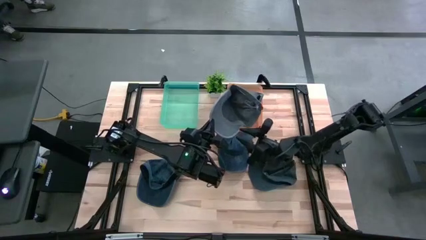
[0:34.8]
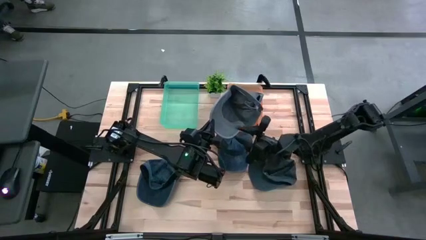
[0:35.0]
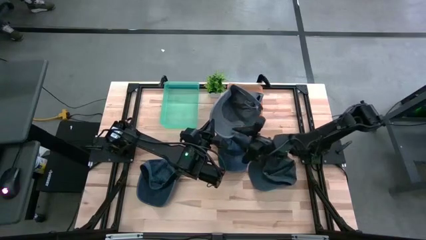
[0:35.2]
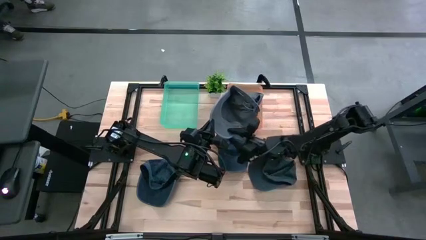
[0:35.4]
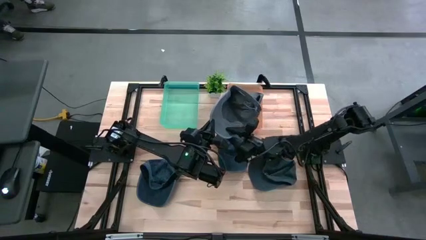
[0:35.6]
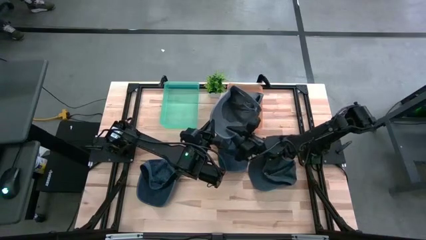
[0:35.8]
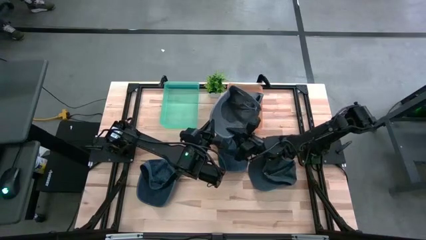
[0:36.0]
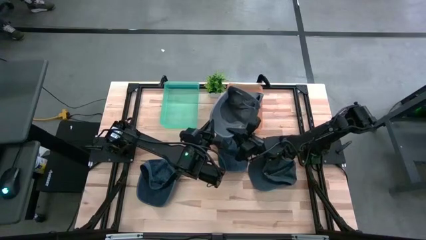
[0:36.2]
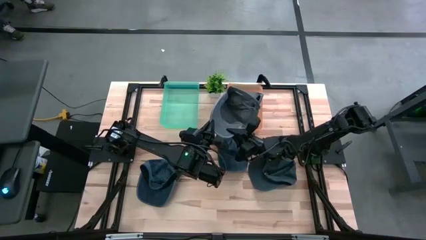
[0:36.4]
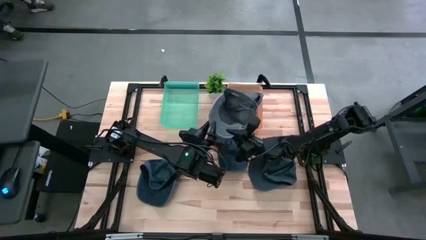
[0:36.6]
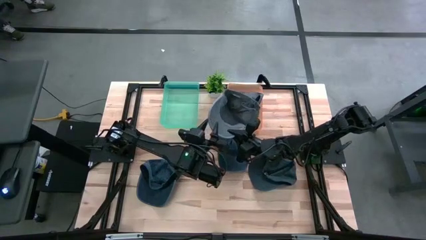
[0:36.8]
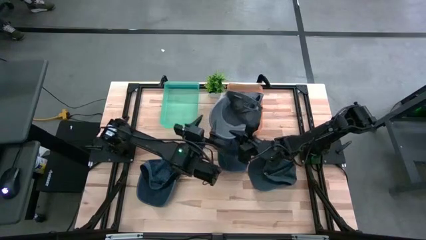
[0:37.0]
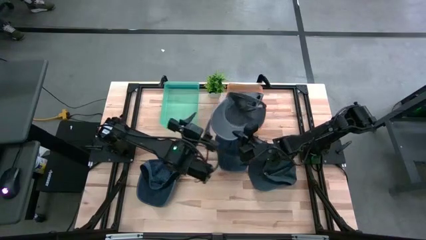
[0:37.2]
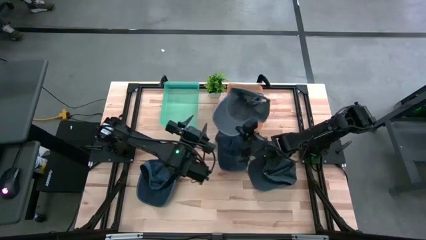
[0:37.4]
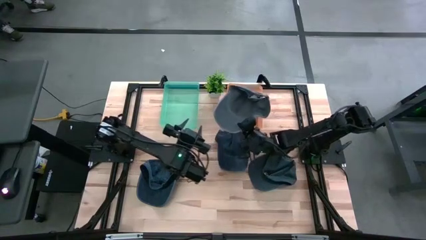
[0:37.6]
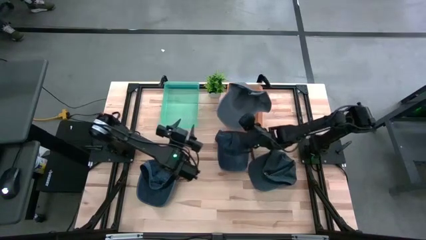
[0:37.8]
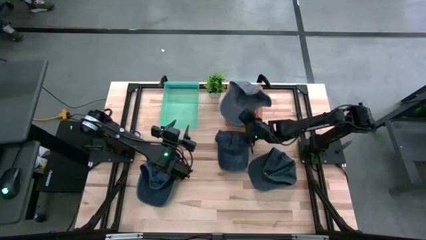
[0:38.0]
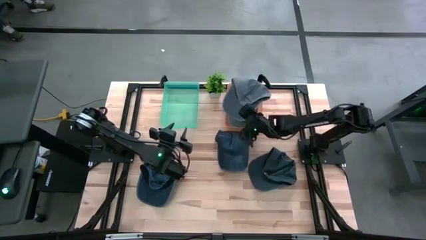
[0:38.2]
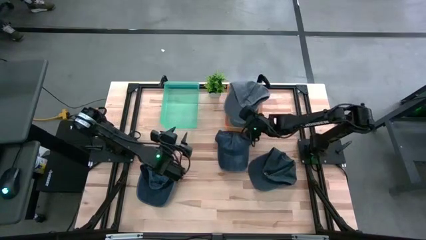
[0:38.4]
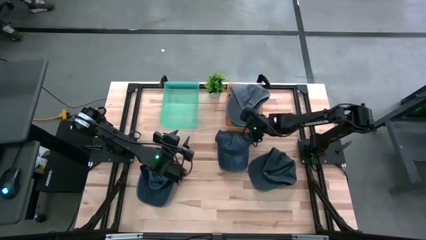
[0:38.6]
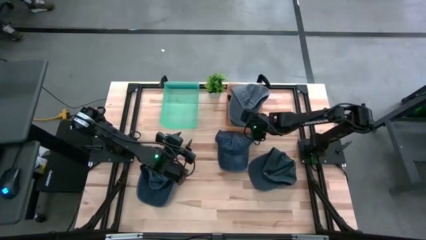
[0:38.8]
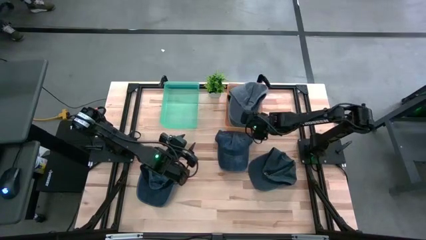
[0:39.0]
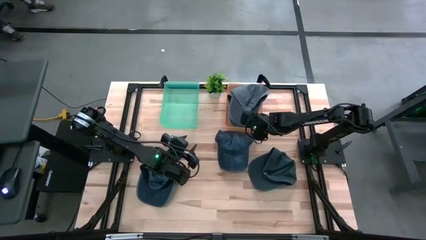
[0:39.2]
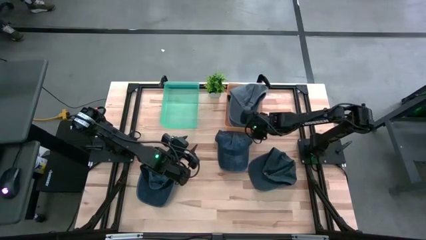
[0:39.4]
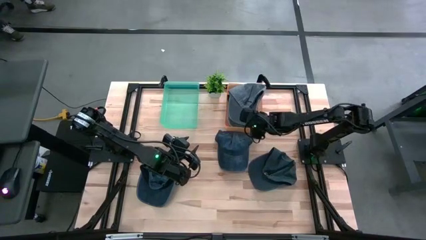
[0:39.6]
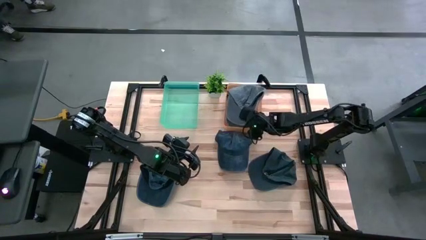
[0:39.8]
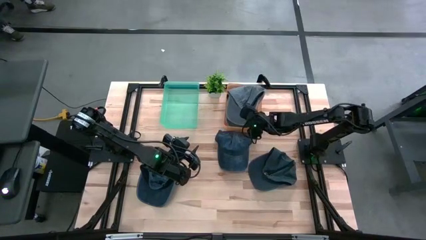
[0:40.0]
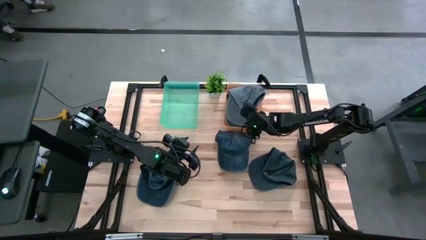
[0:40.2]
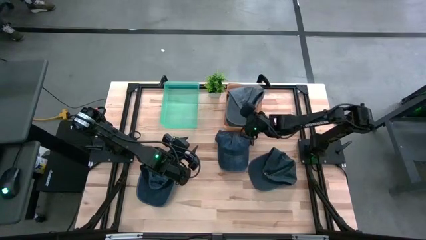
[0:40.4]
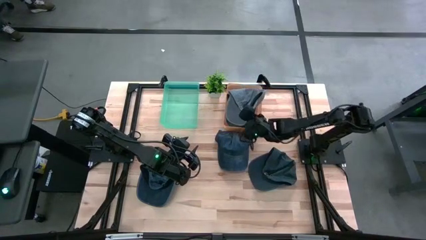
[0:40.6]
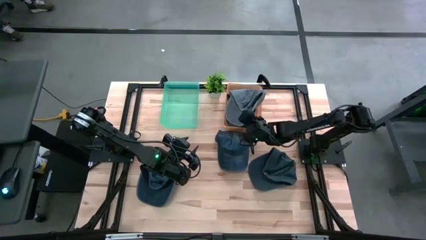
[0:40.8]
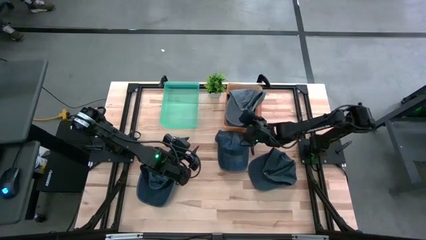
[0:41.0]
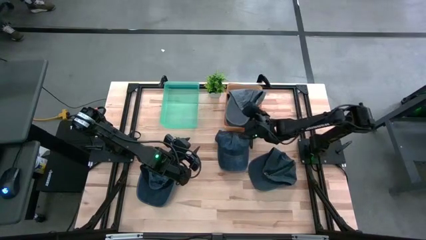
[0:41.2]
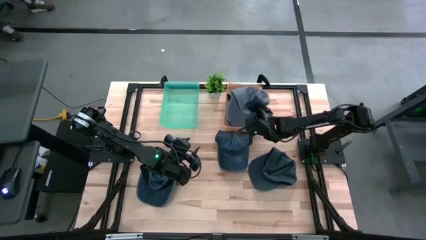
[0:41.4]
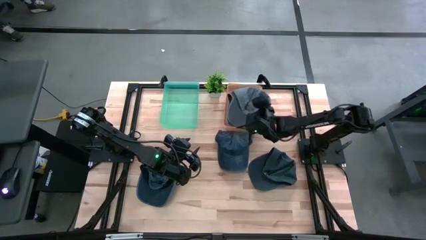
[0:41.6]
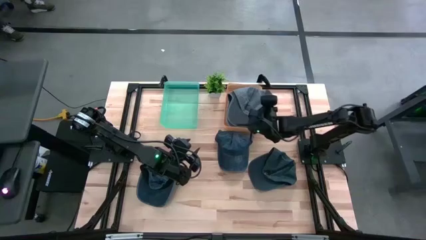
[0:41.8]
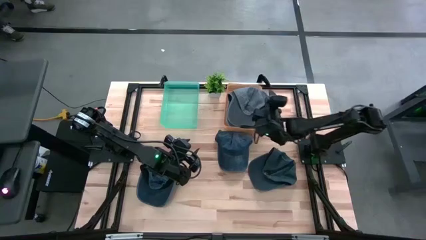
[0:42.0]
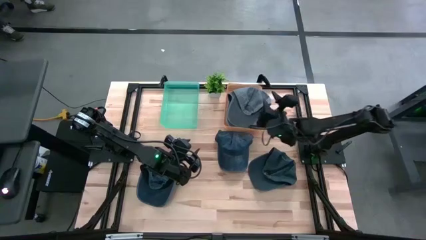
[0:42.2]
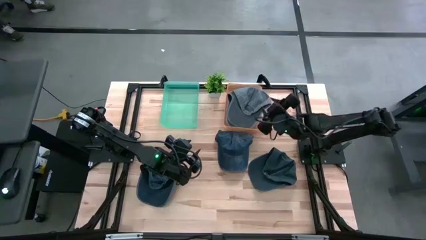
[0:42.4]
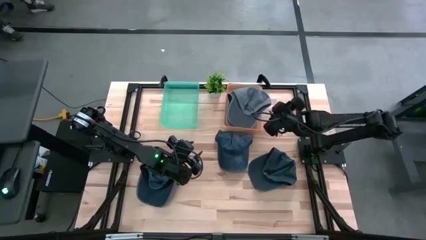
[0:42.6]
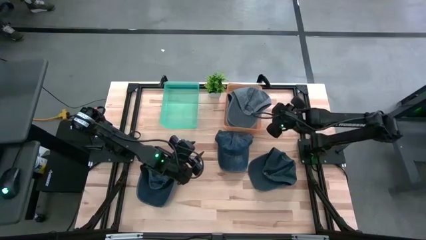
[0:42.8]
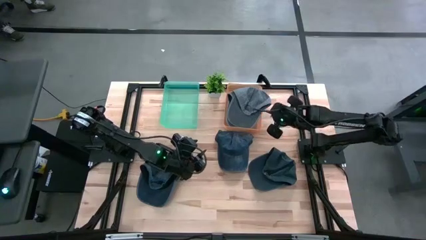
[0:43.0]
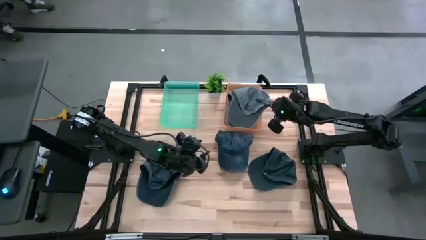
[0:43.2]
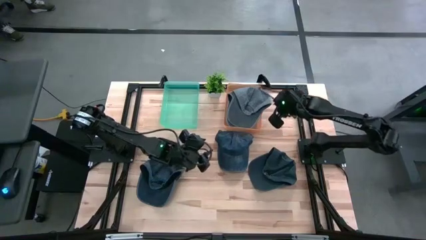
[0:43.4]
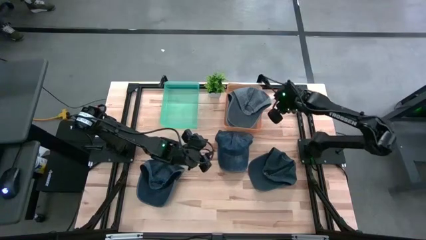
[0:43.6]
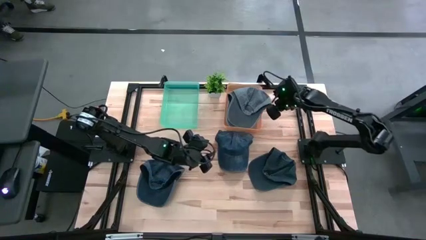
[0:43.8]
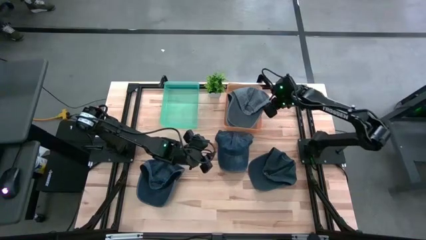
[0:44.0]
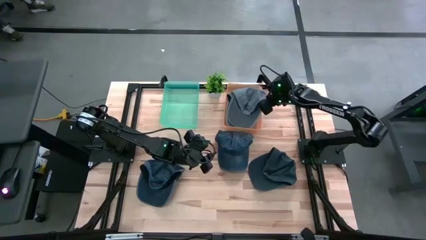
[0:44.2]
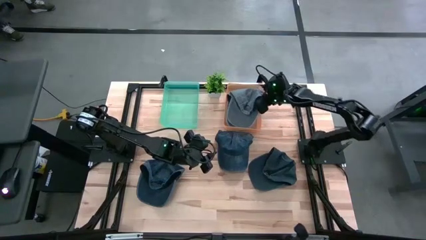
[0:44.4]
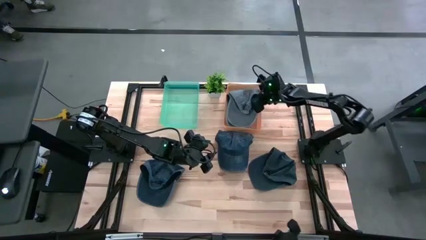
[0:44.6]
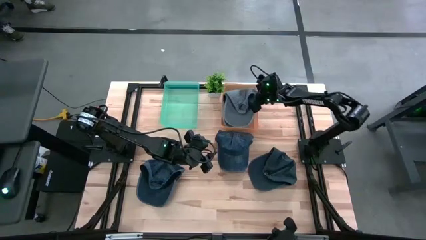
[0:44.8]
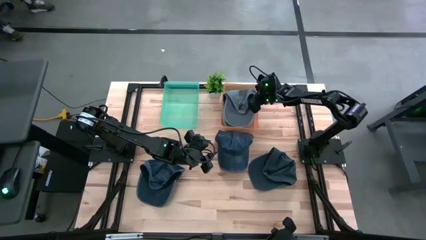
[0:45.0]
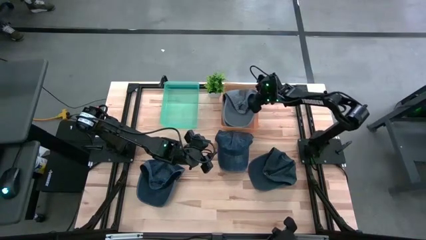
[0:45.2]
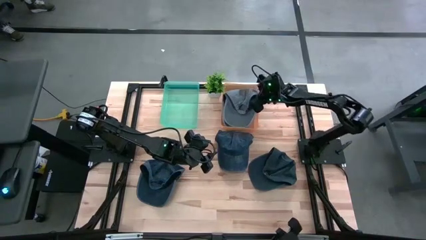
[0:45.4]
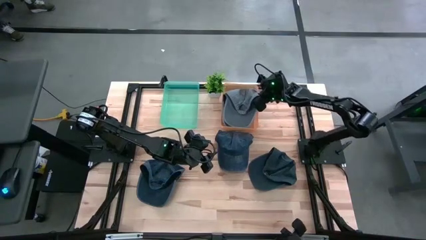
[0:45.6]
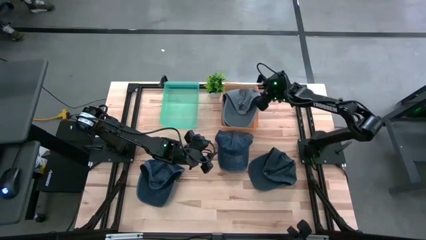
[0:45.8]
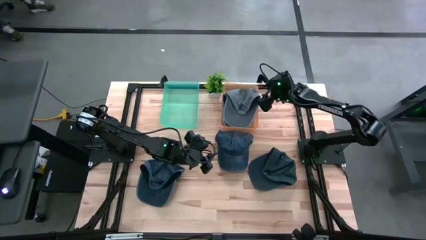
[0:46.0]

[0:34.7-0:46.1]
Task: Pick & Place hat
Put the light gray cap into the orange bin

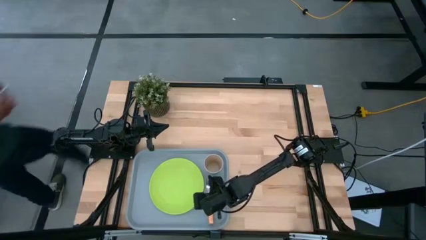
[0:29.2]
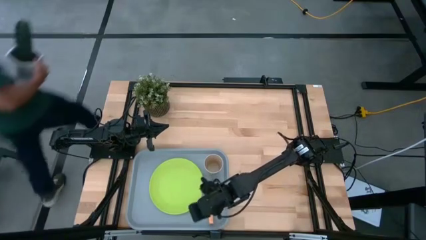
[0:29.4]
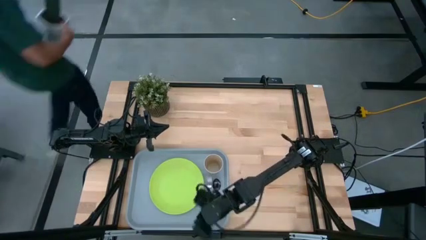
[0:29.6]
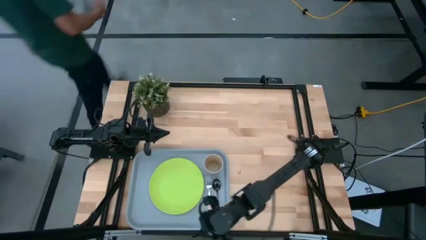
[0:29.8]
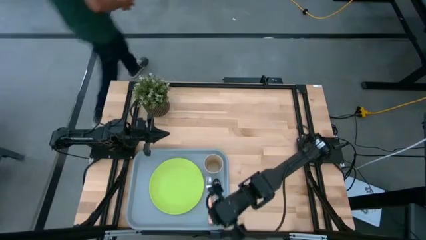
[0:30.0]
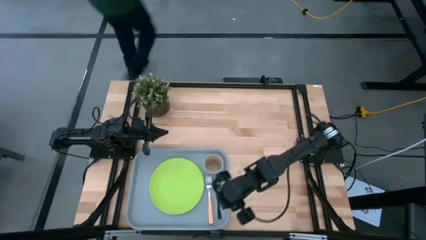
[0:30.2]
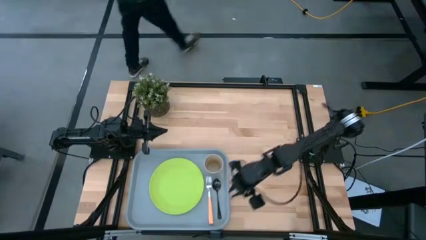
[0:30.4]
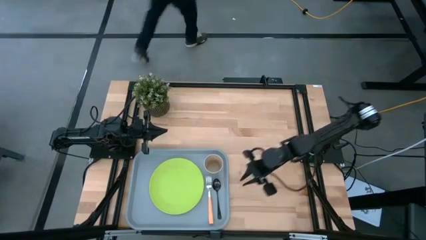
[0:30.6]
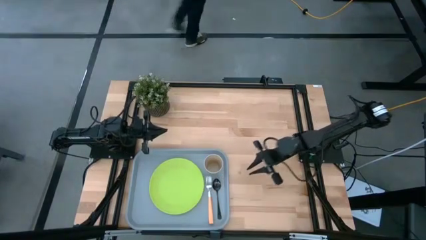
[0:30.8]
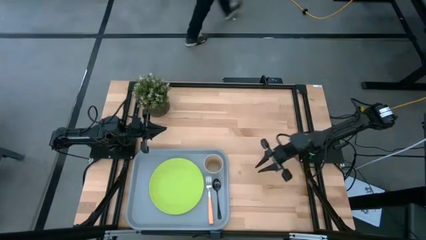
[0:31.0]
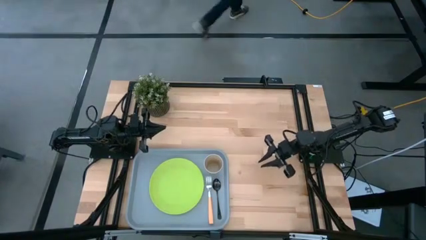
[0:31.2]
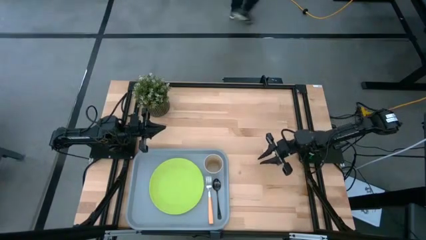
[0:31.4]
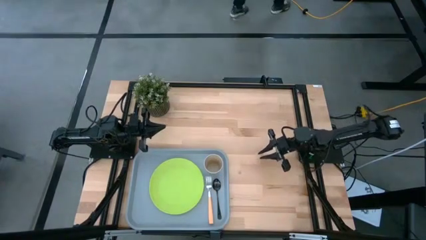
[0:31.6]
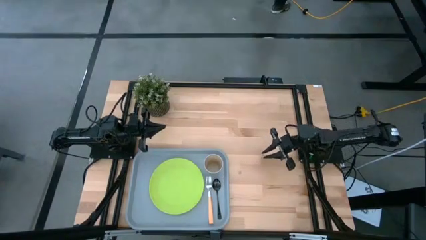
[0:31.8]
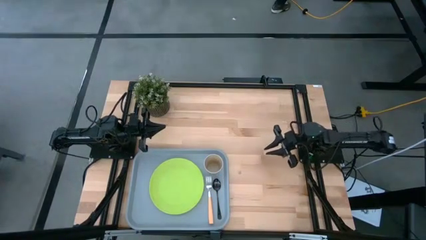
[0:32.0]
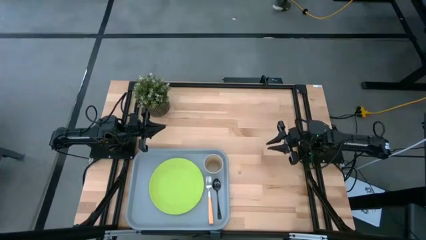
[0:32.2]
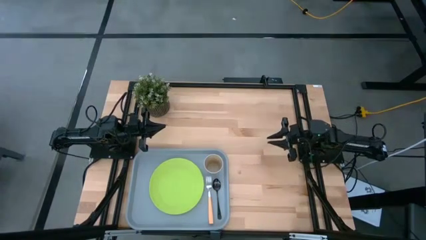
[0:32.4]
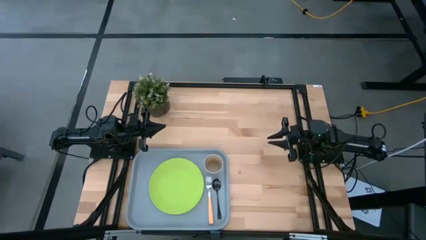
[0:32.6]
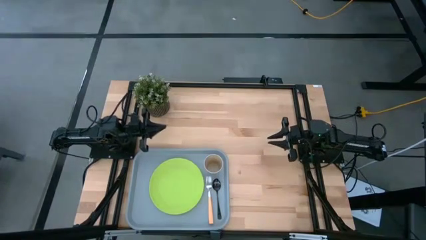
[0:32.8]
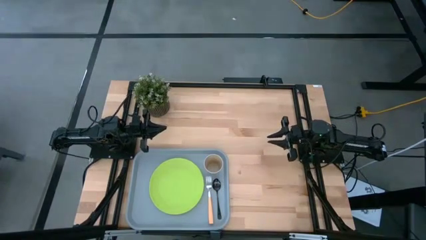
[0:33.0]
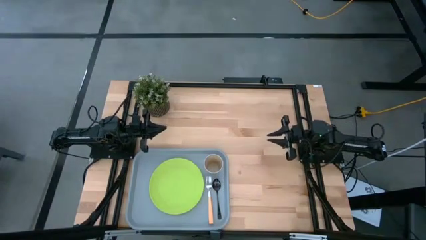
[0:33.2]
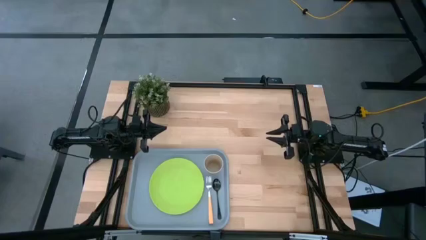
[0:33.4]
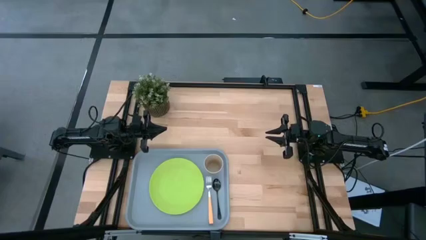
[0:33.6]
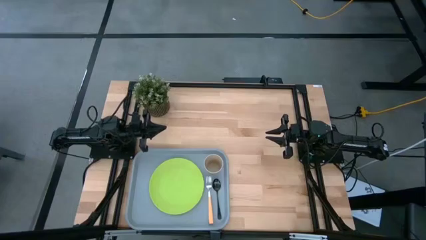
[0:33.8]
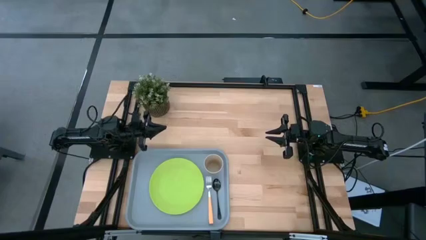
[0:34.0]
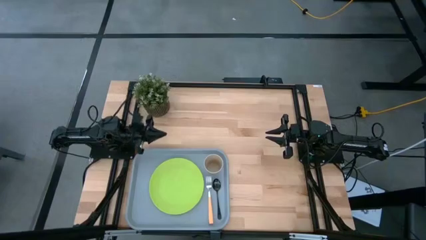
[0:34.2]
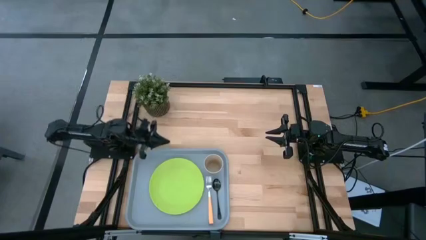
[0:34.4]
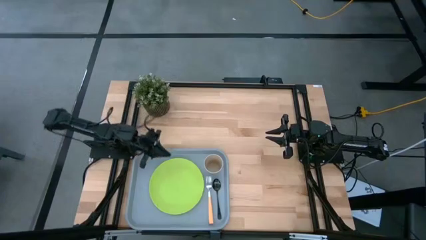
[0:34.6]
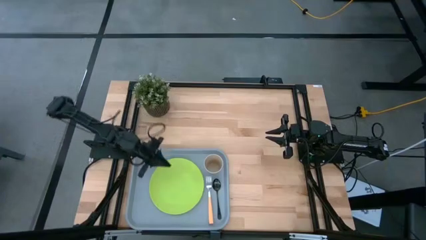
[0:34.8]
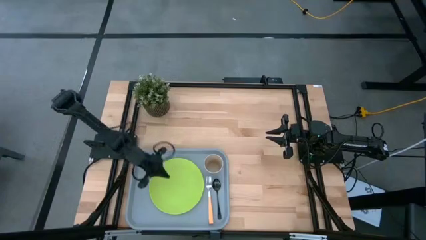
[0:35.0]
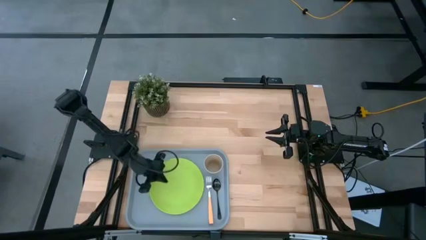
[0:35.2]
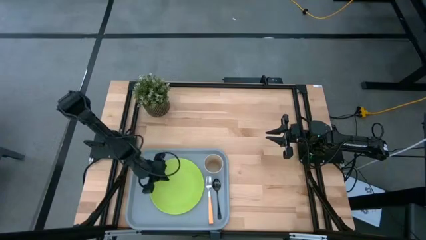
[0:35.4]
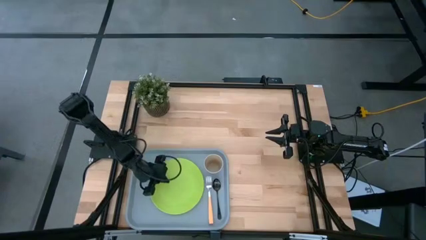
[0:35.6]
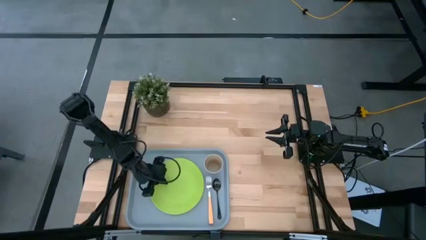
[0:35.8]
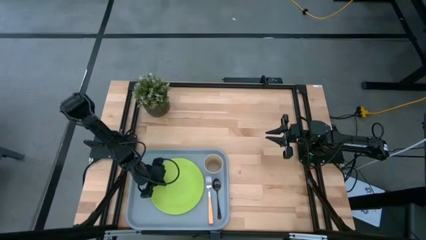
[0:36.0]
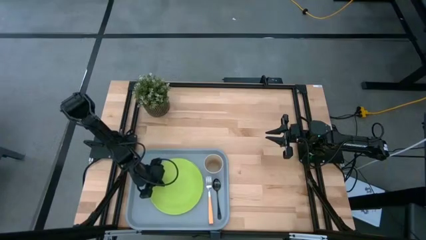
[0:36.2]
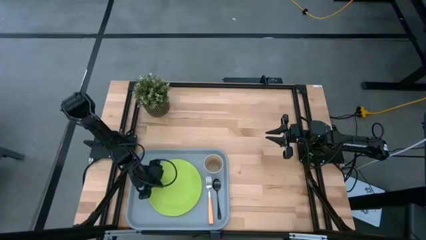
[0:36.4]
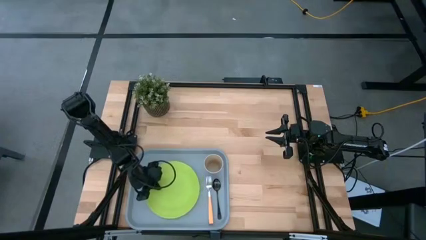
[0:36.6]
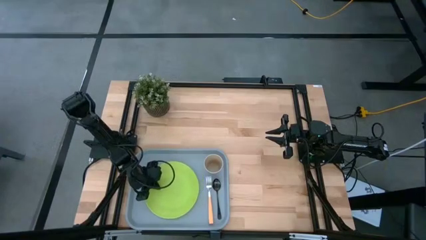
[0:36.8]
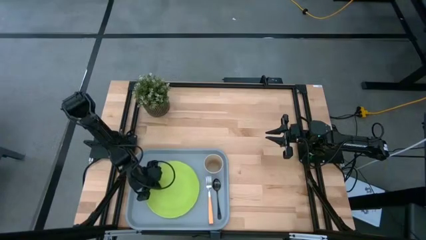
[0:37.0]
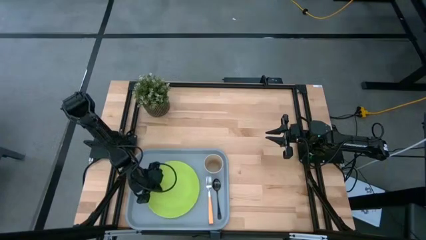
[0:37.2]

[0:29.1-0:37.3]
Task: Pick and place plate/cup/fork/spoon on tray
Adjust the light green plate on the serving tray
